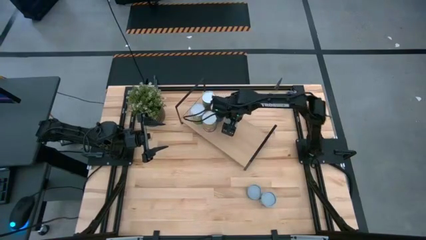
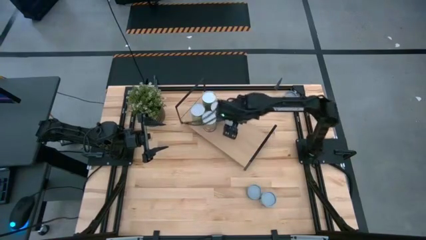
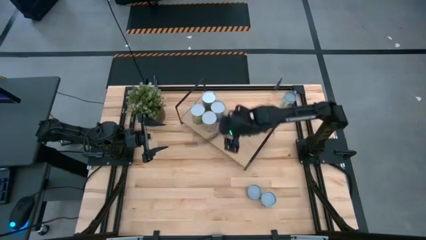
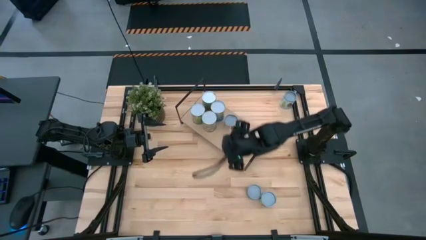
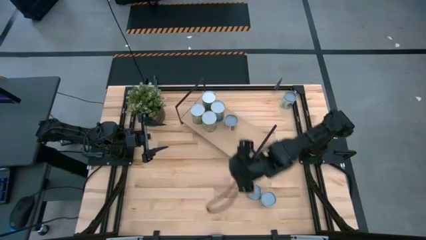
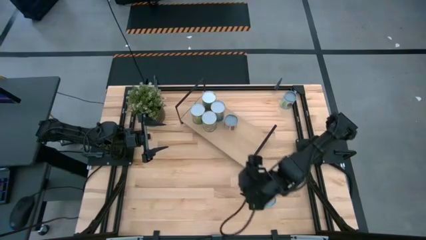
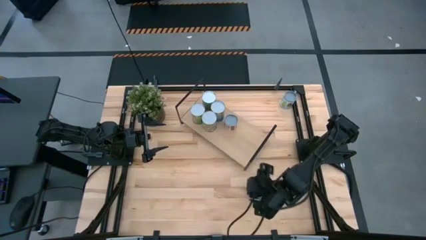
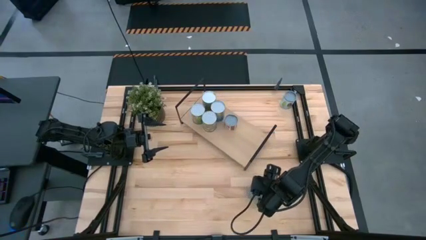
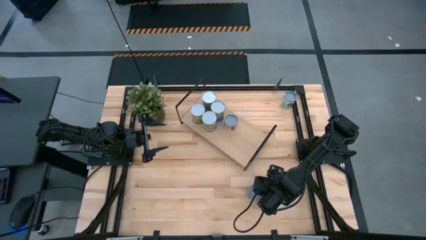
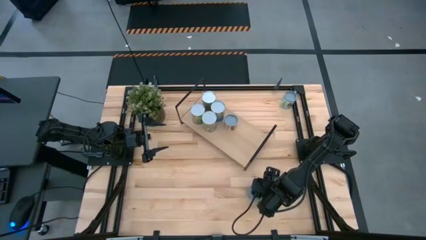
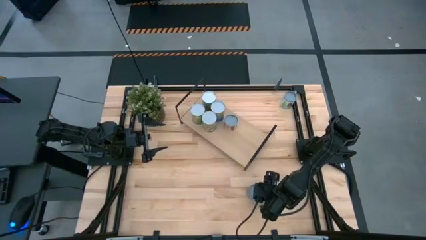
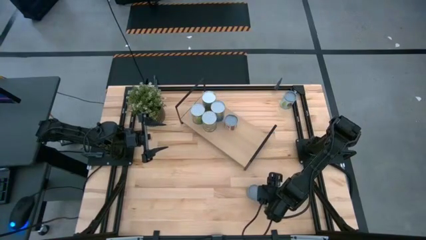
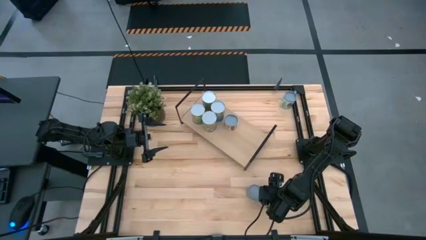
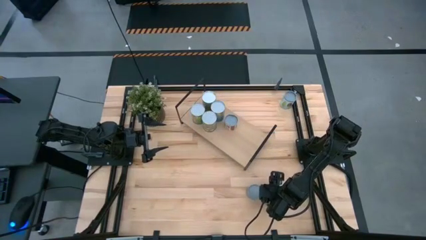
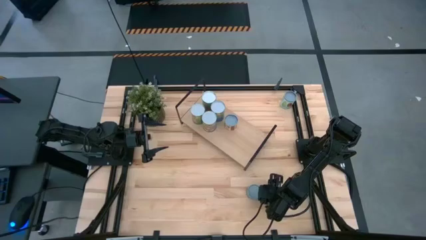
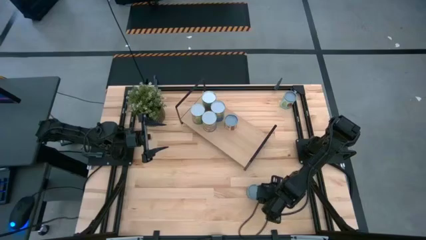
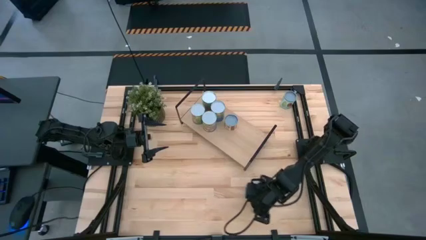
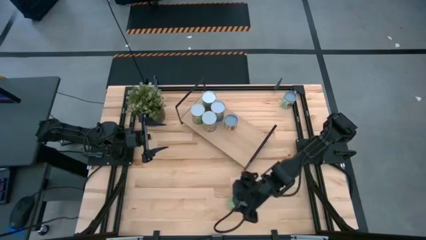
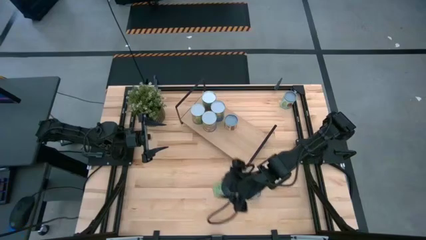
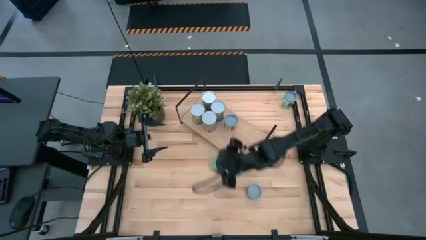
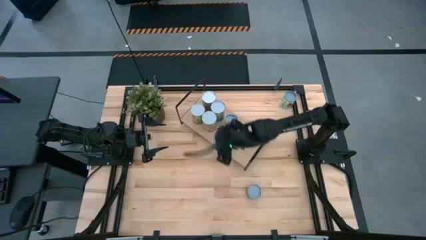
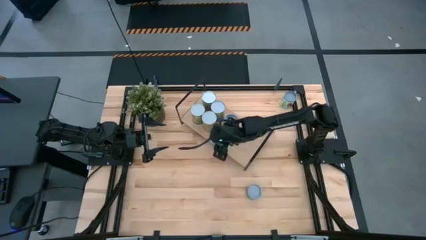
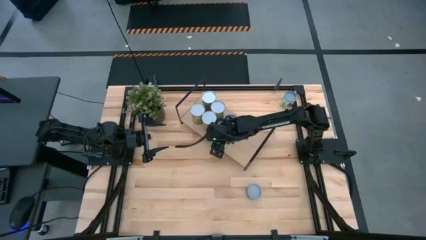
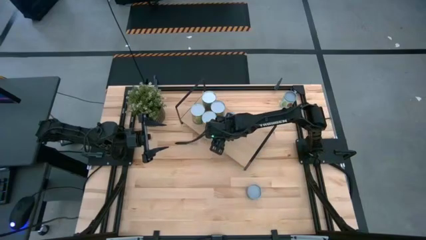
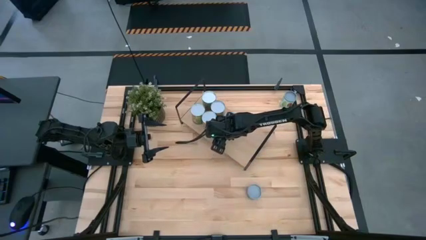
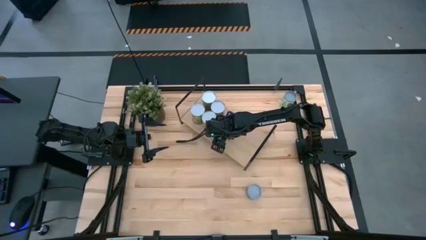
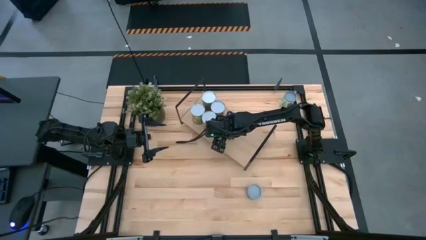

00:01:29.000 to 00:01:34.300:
Task: Pick and place cans onto a shelf
Put the canned green peas on the shelf

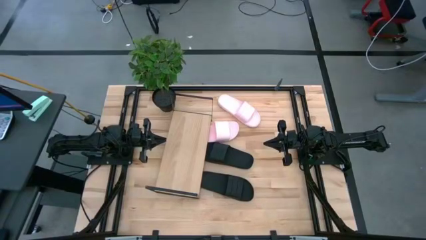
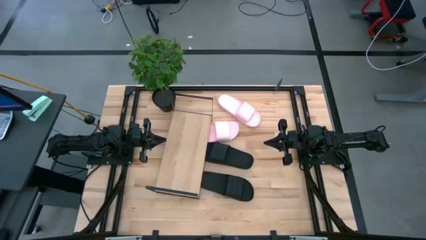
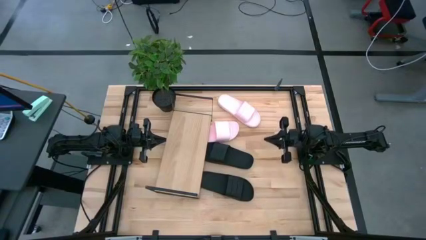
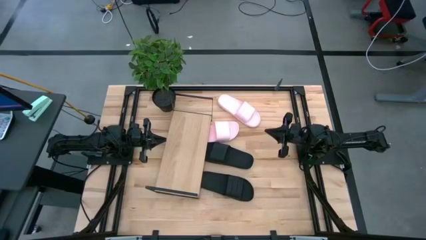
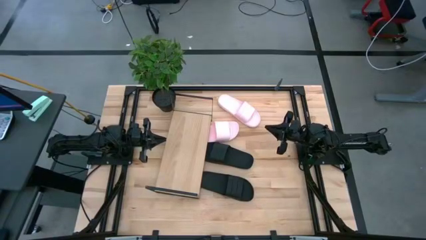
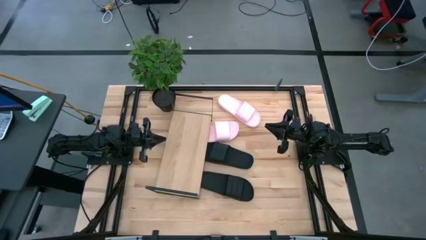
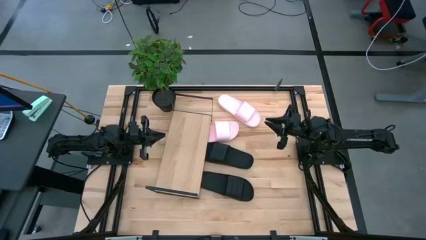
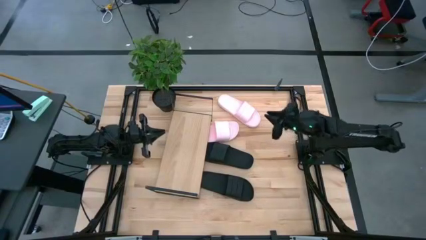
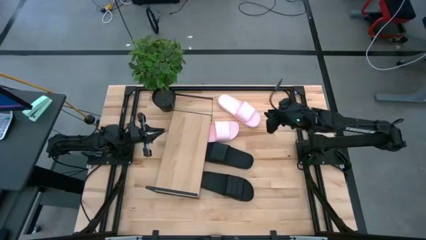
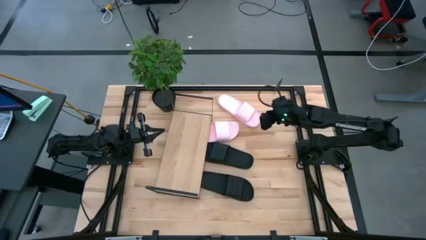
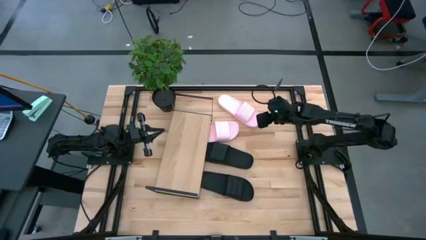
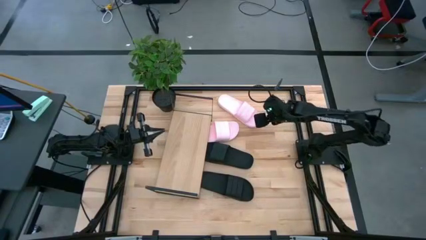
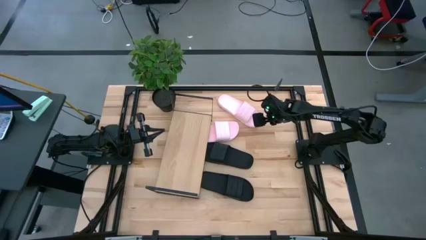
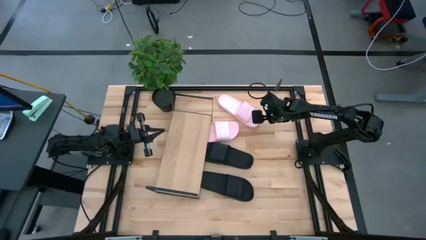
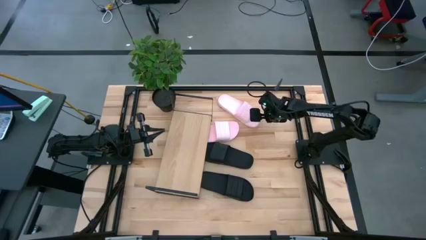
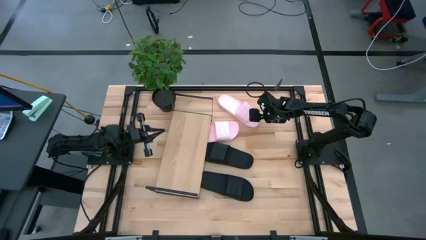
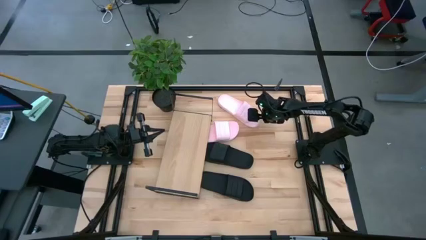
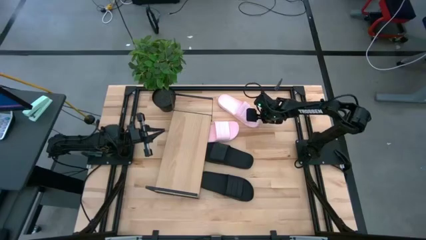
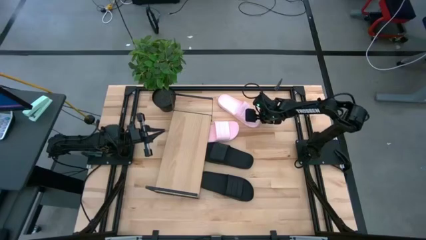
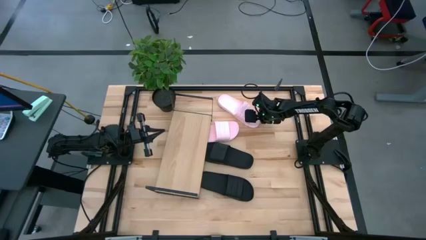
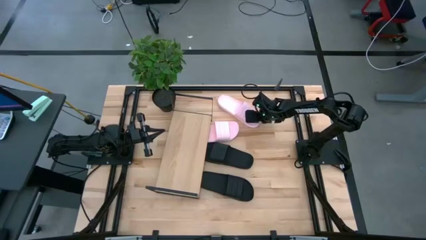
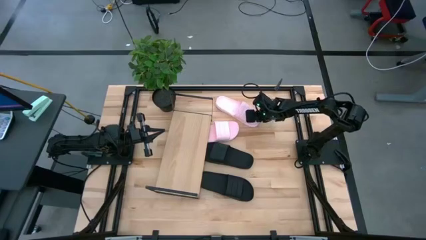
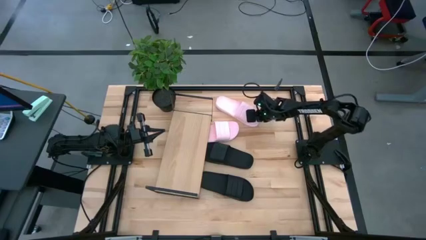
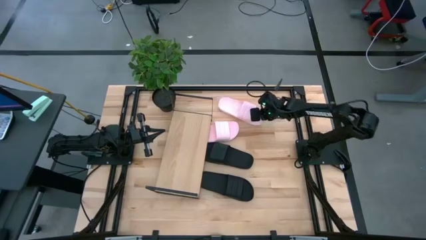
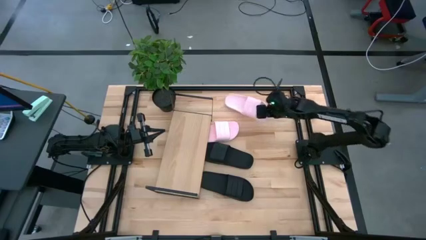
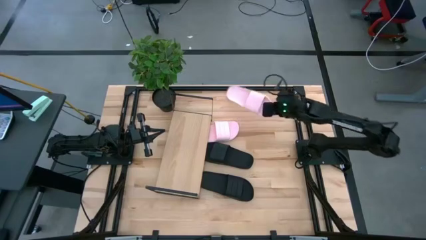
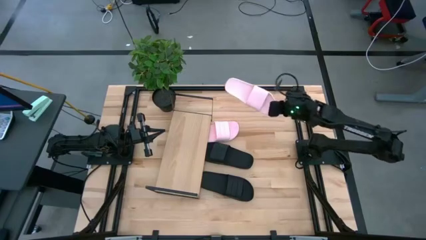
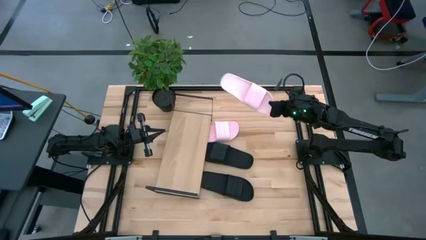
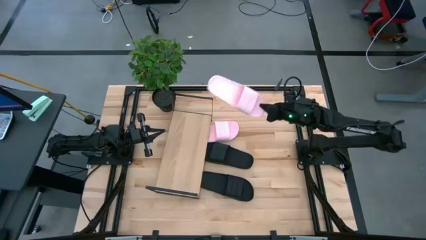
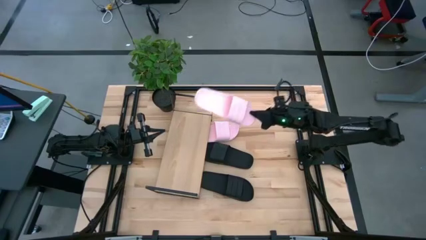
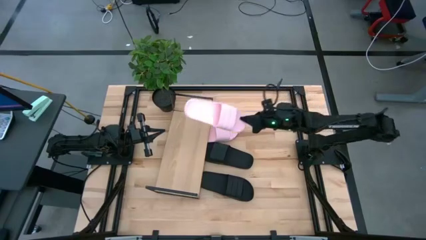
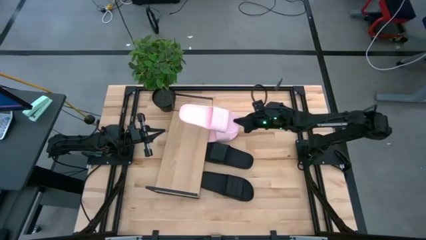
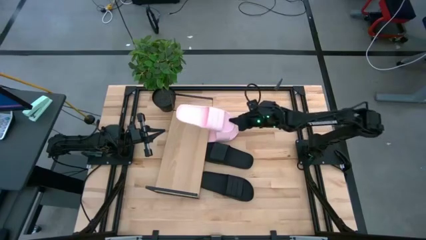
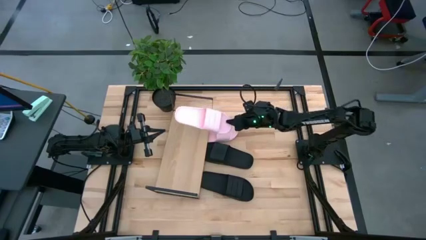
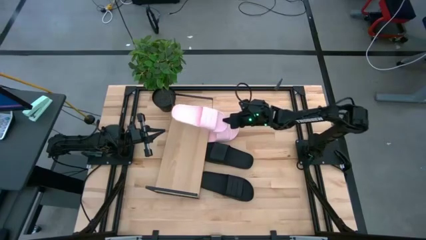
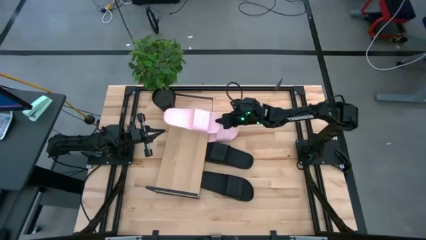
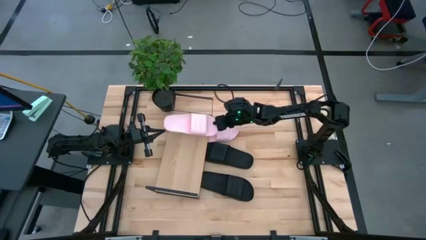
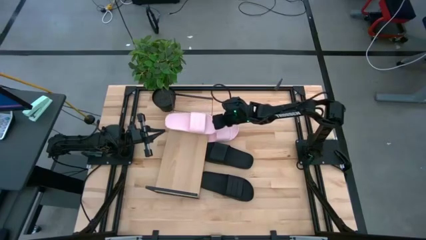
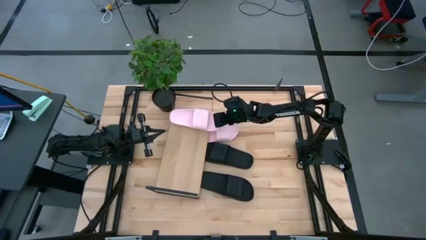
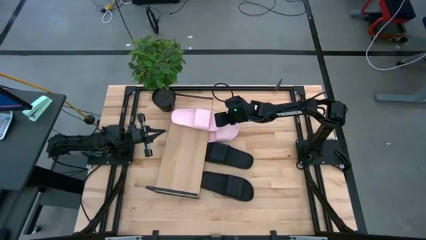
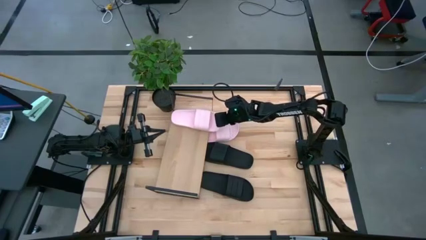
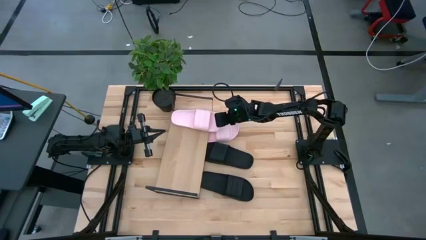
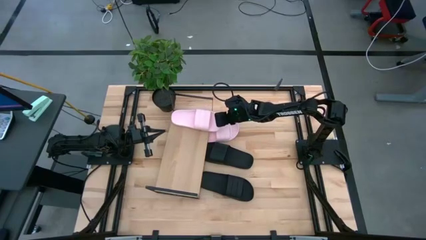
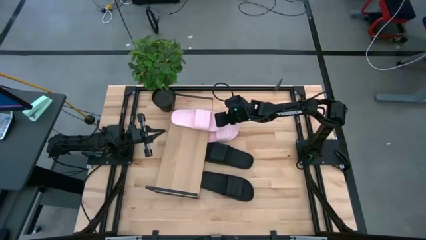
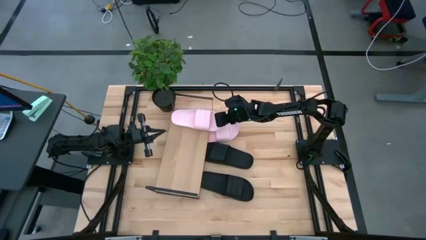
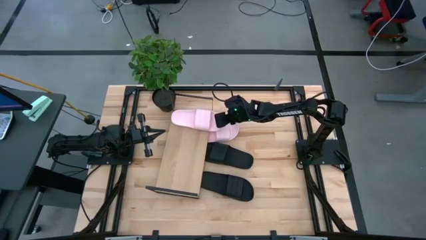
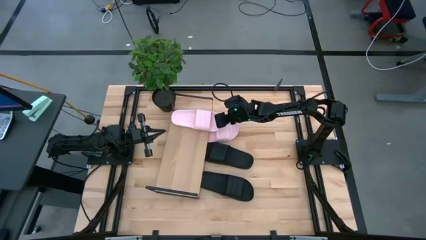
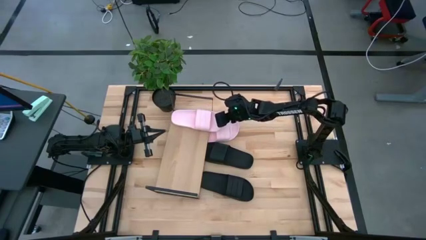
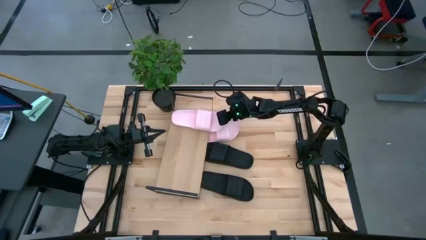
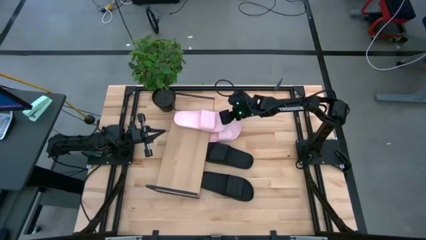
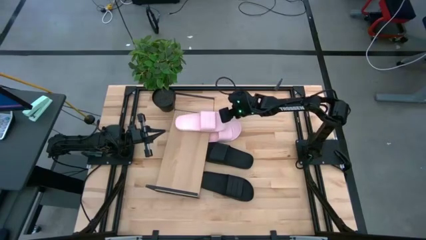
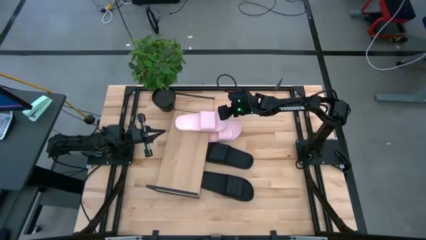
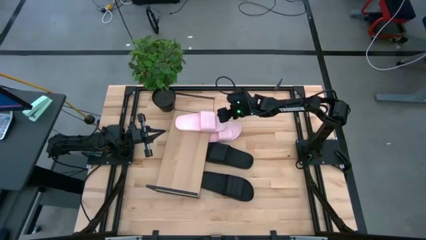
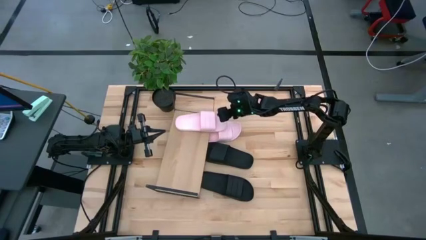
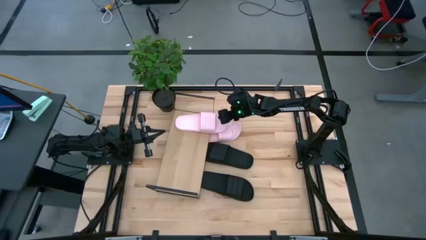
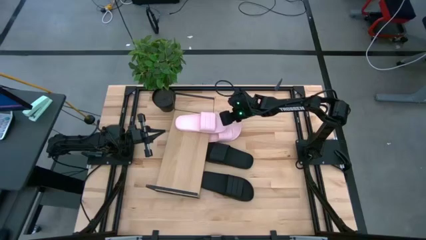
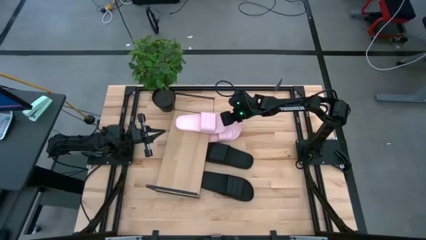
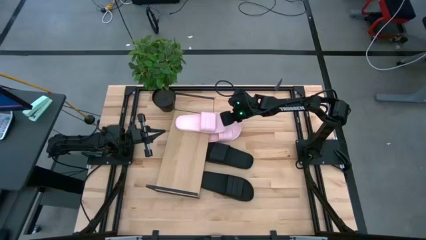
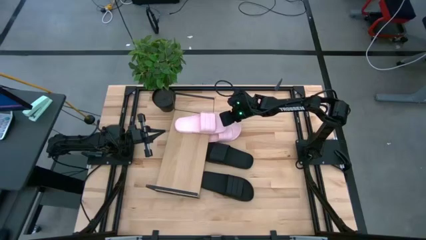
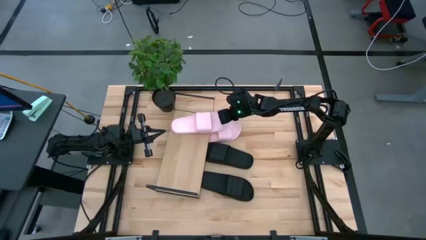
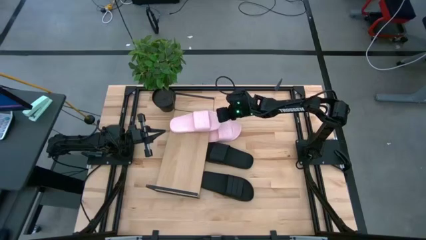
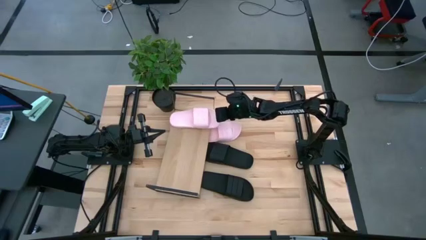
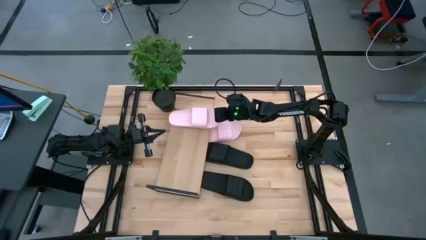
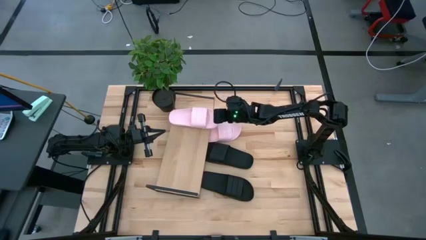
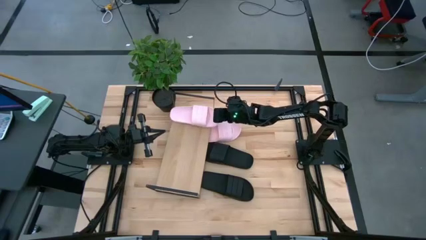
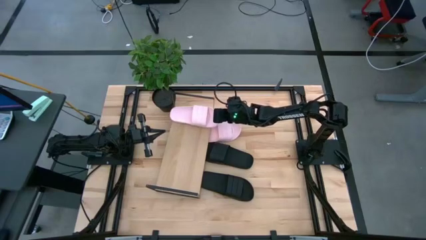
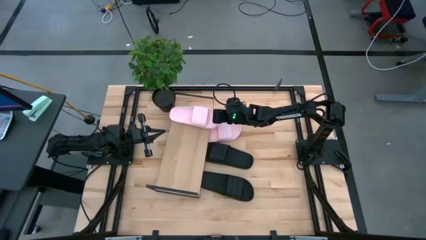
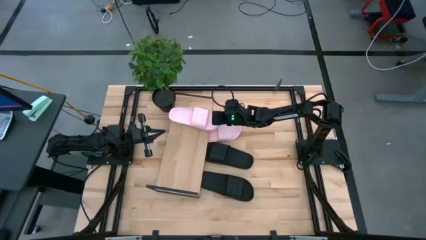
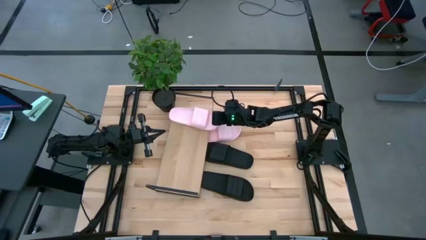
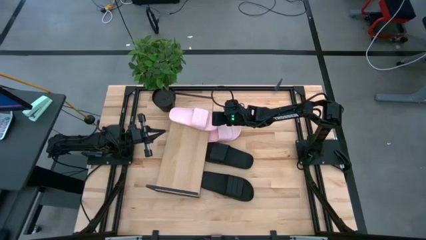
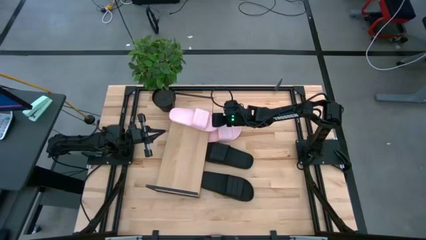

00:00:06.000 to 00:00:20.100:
Task: Pick and place slides into the shelf
Put the top pink slipper on the shelf
